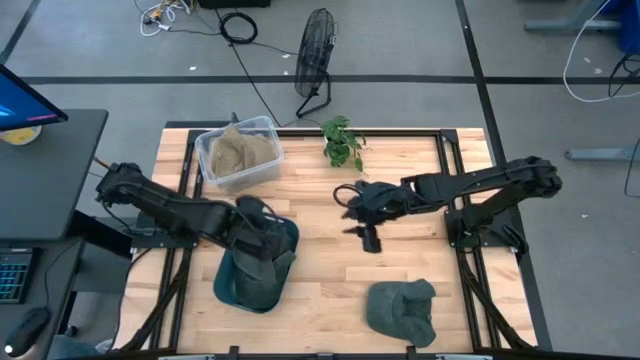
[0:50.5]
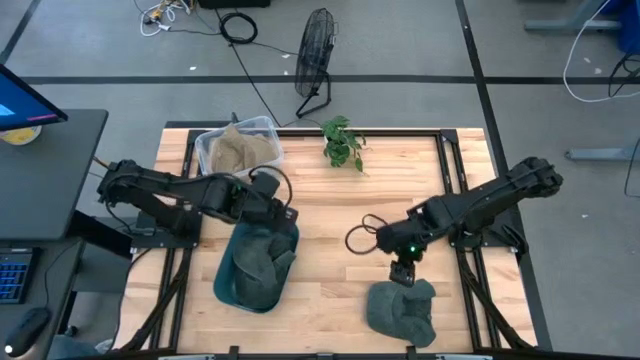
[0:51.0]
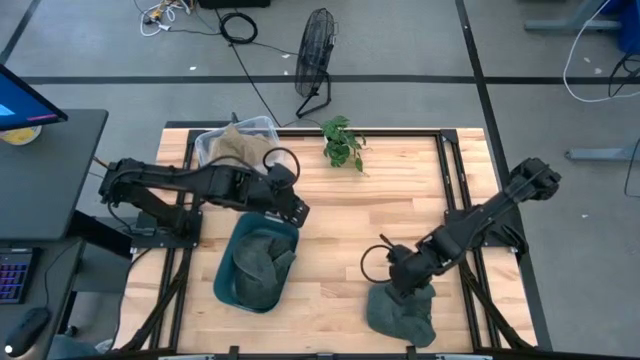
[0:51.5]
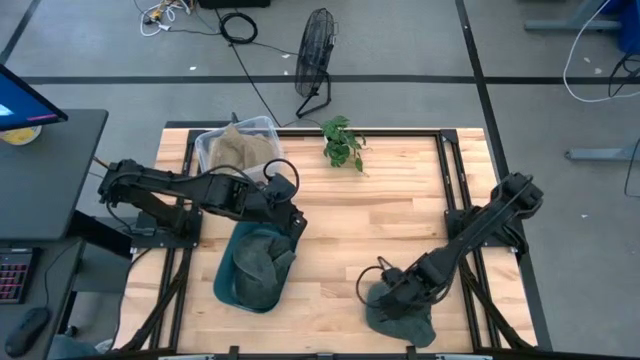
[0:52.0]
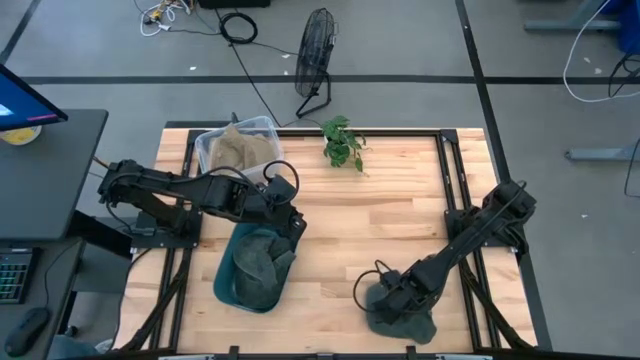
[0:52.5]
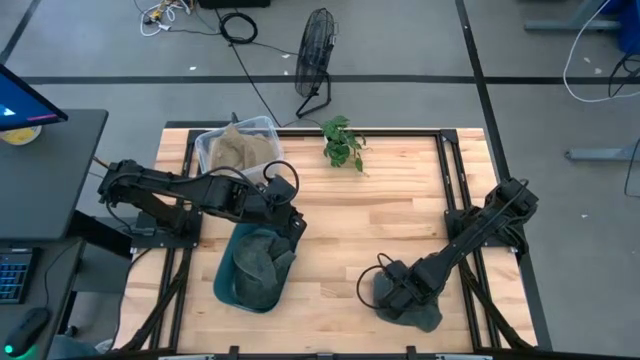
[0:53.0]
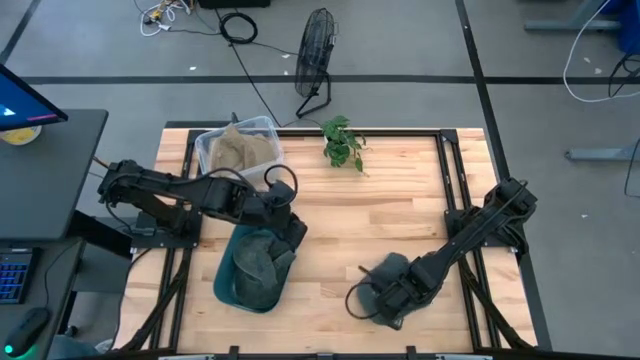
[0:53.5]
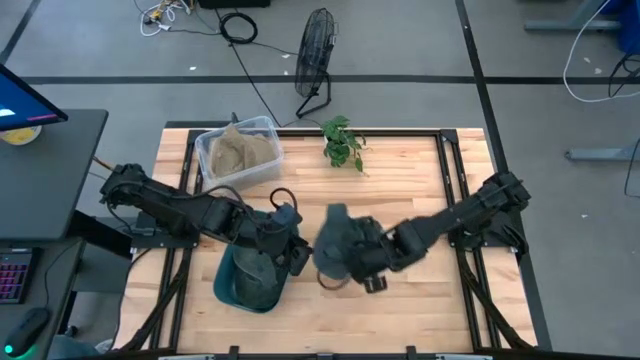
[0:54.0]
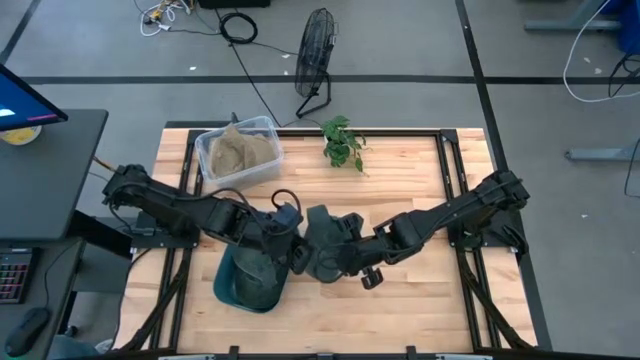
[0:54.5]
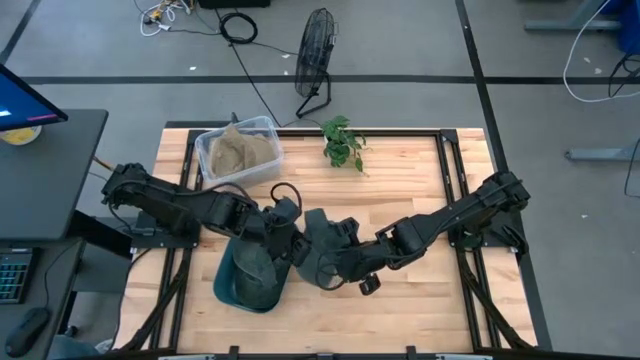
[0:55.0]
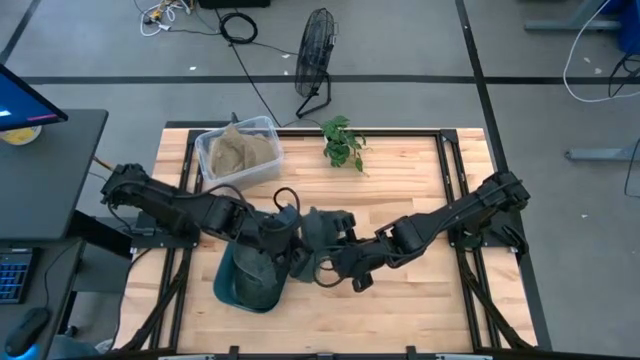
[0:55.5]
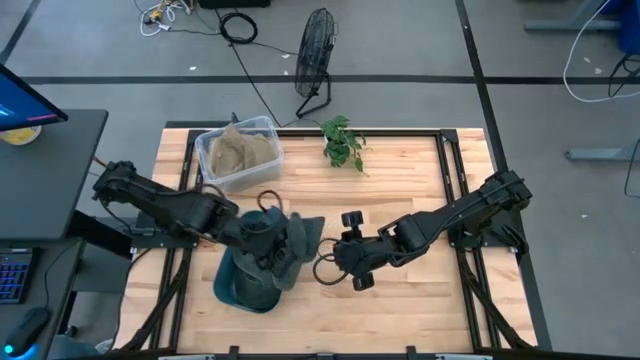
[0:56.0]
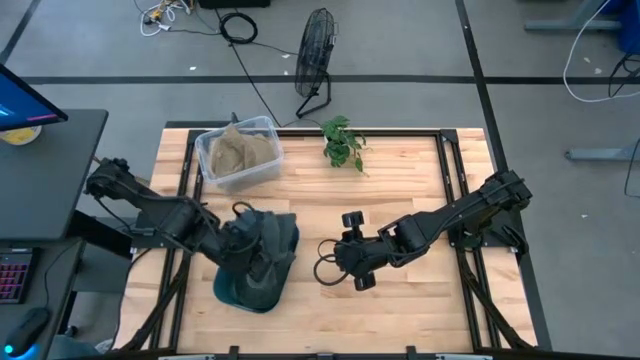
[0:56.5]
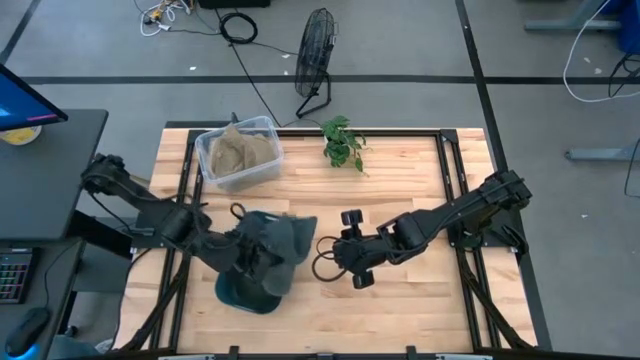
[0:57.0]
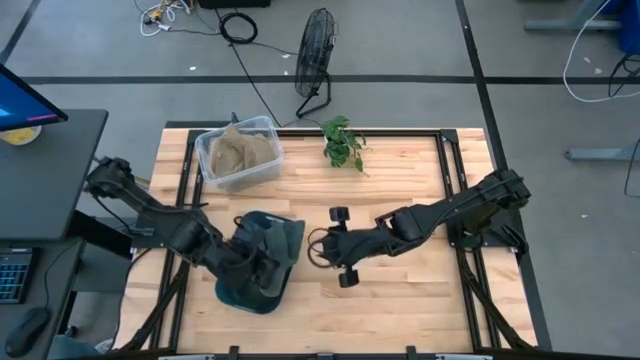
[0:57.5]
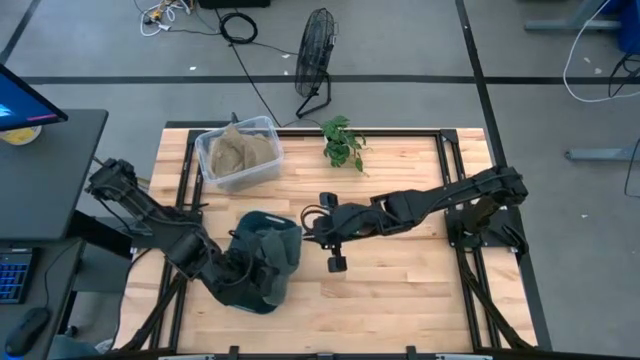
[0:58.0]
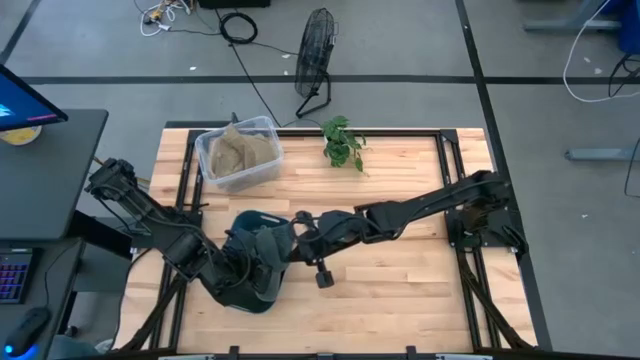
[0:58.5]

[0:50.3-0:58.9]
Task: Pick & Place hat
Put the gray cap into the blue bin

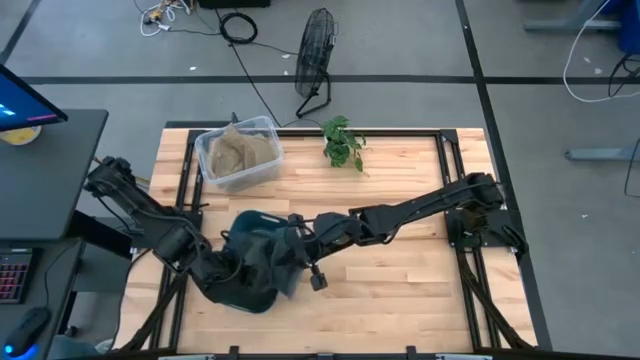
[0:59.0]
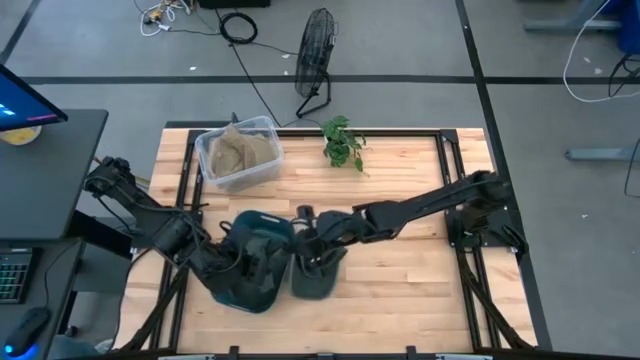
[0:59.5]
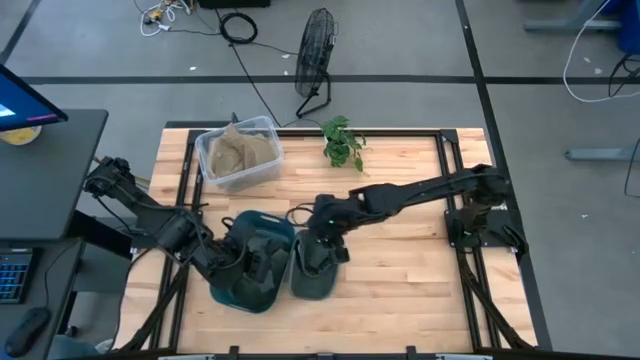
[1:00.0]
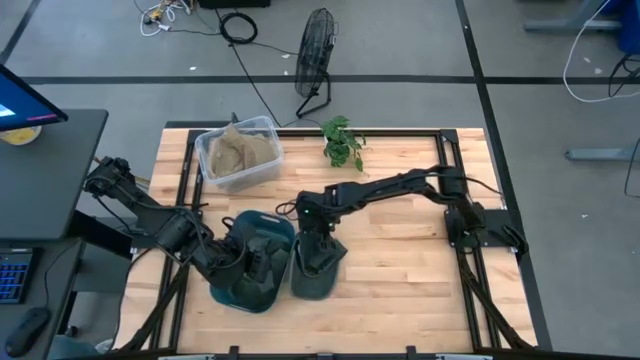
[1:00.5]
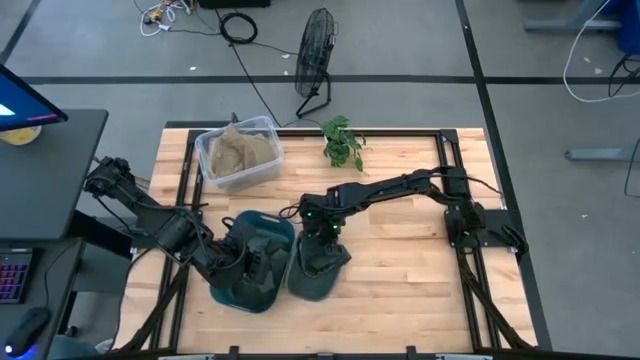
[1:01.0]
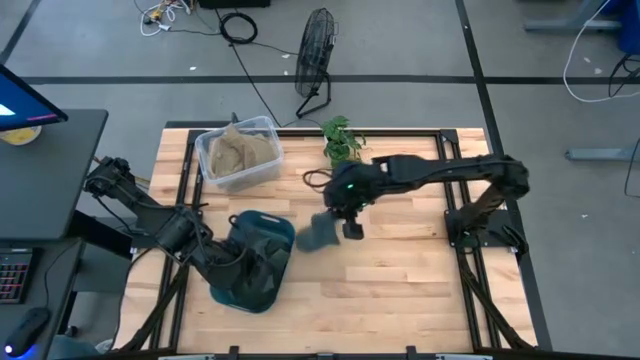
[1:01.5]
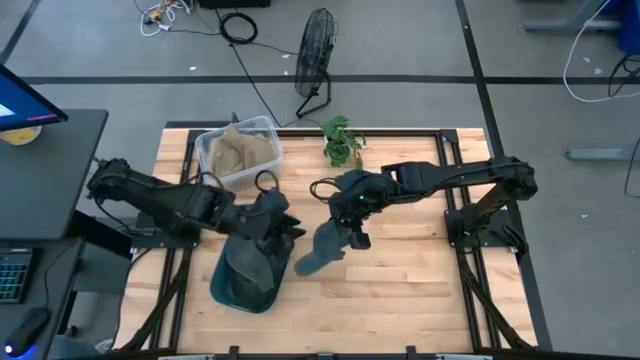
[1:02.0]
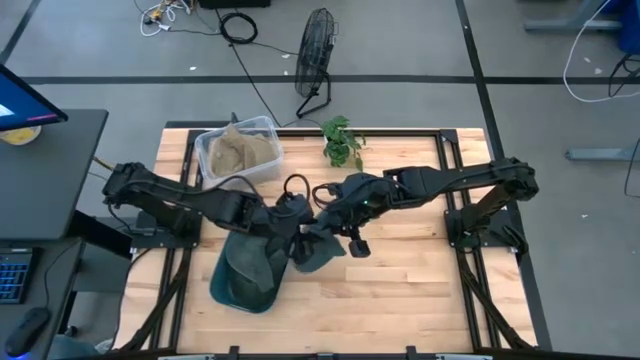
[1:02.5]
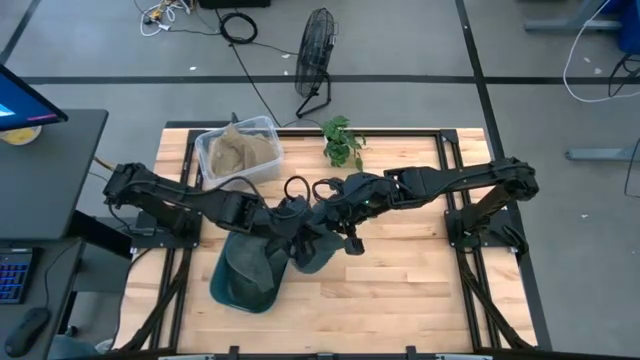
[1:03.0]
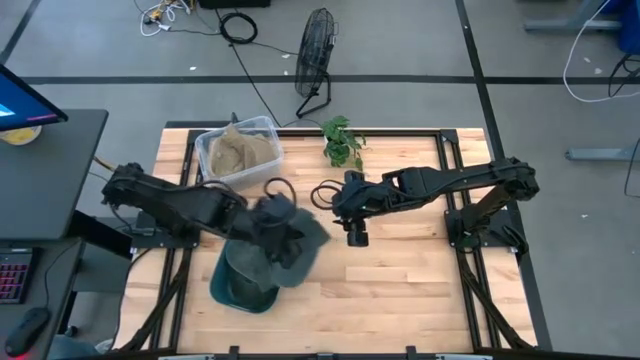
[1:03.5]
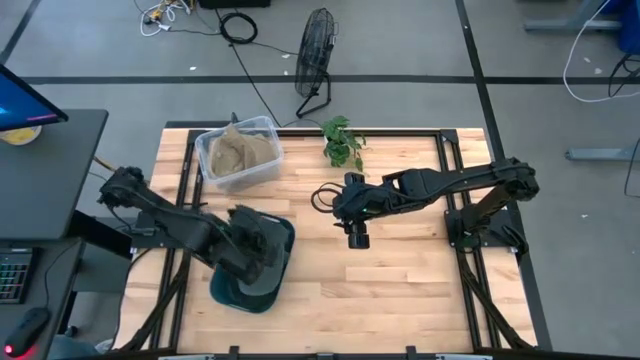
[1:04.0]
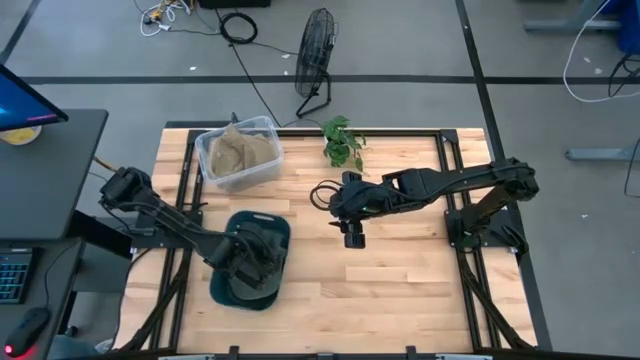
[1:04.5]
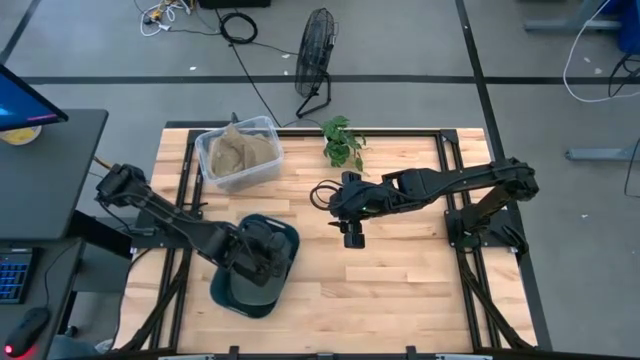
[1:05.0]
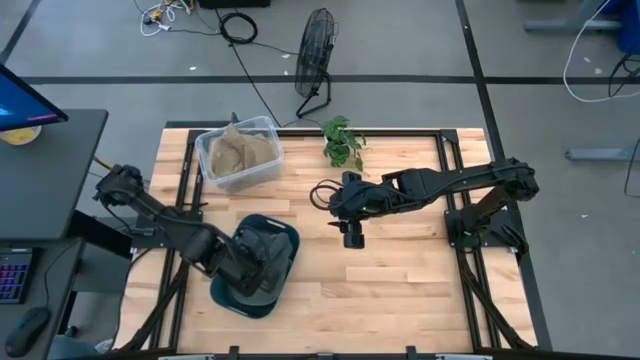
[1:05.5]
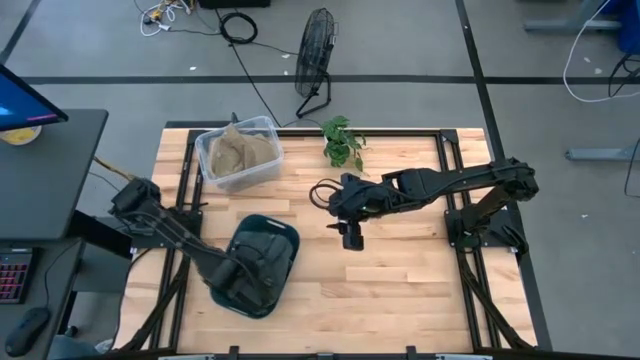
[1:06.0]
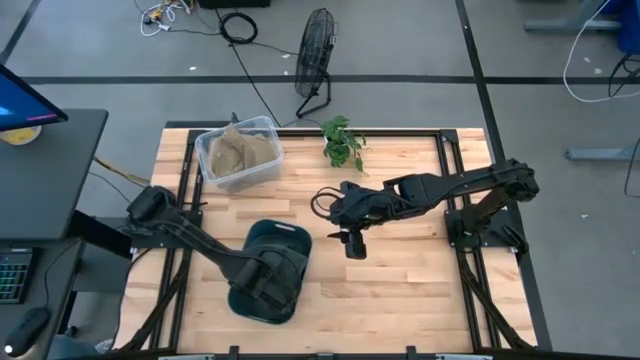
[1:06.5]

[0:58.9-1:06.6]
Put the gray cap into the blue bin

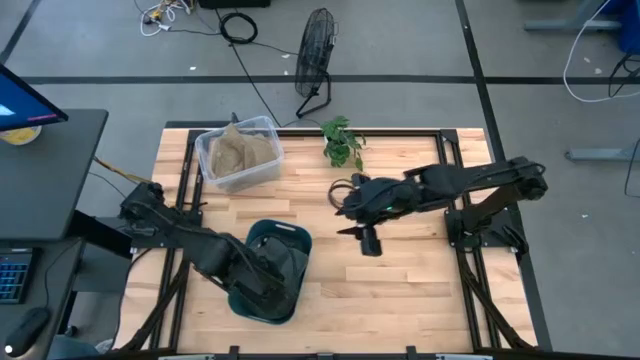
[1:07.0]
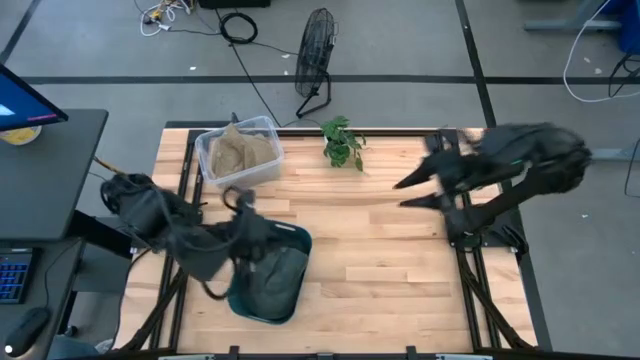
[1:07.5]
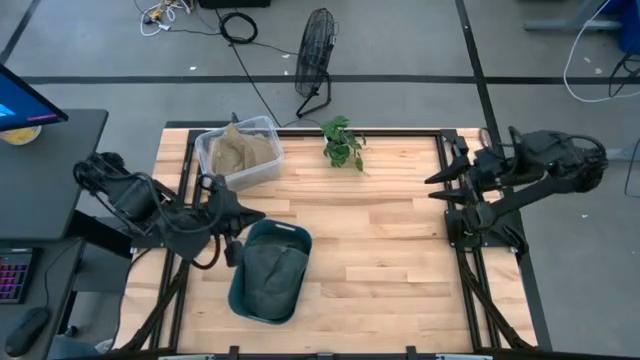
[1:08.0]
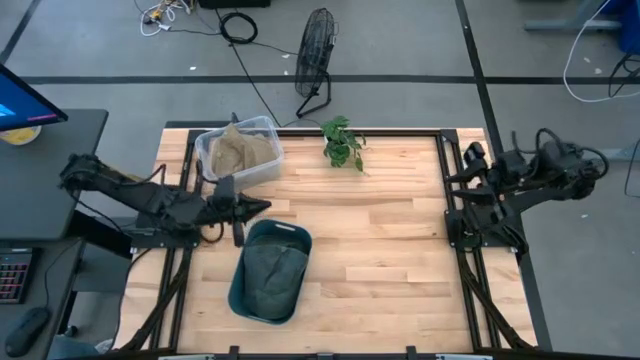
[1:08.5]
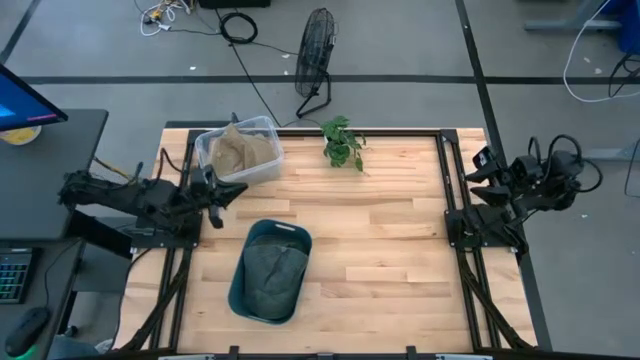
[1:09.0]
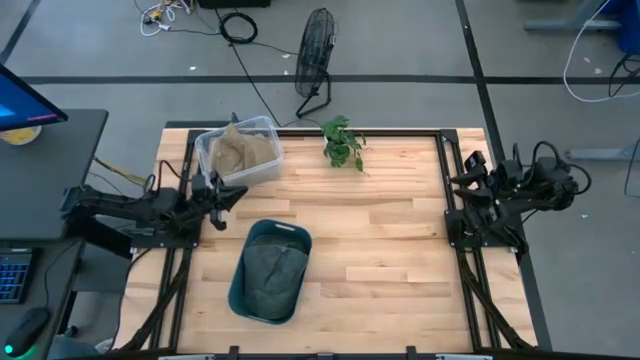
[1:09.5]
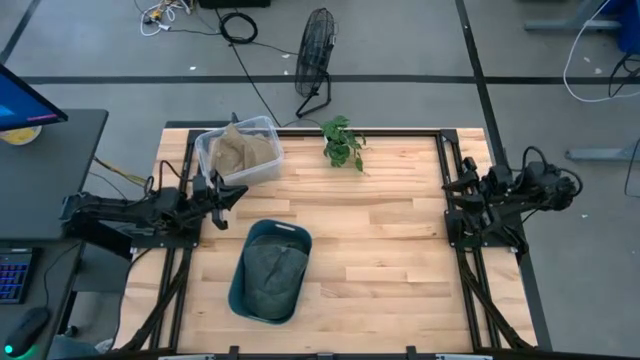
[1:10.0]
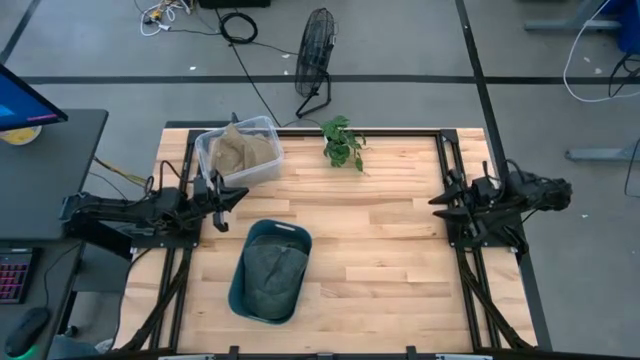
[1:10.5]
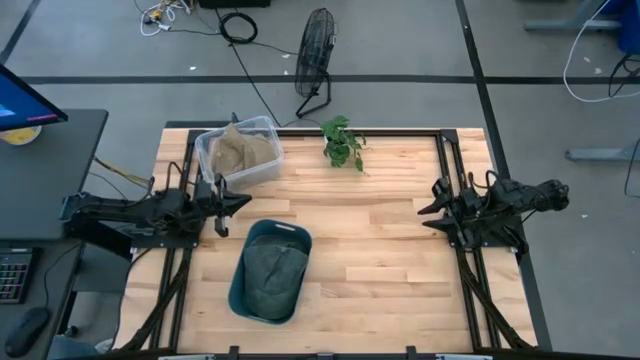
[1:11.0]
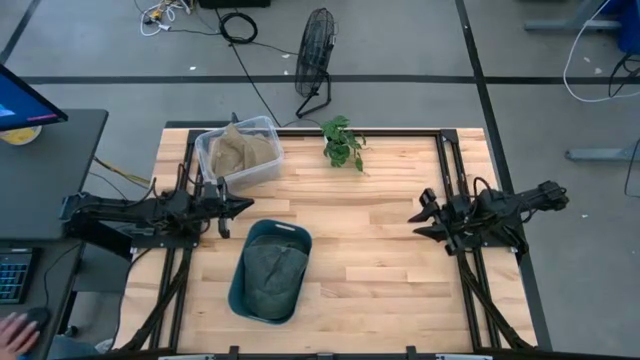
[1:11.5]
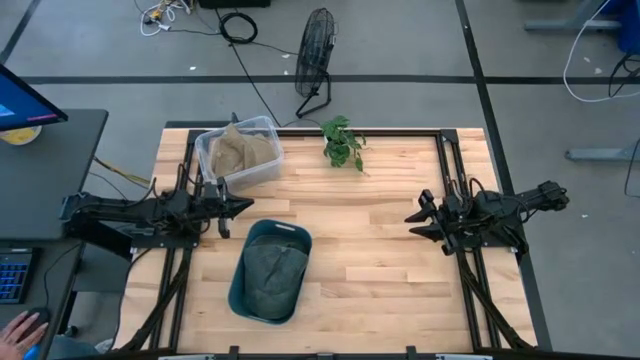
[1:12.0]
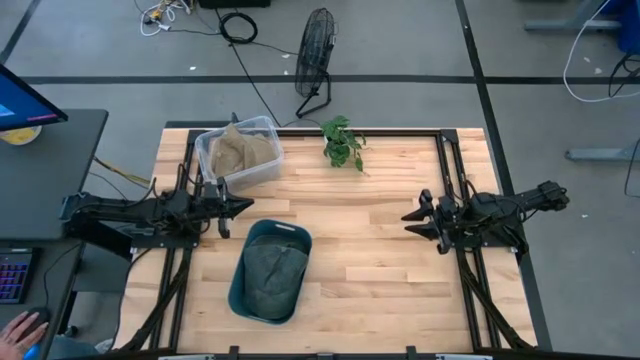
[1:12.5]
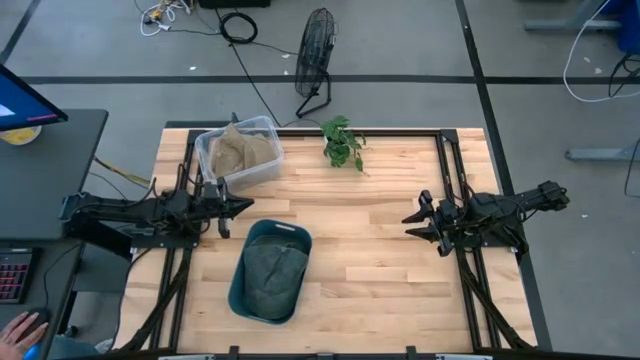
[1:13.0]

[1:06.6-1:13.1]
Return to Home Position
